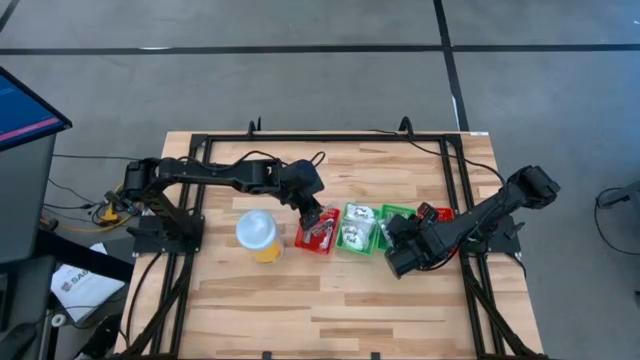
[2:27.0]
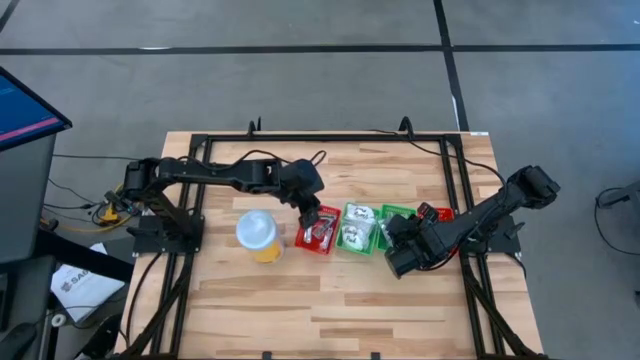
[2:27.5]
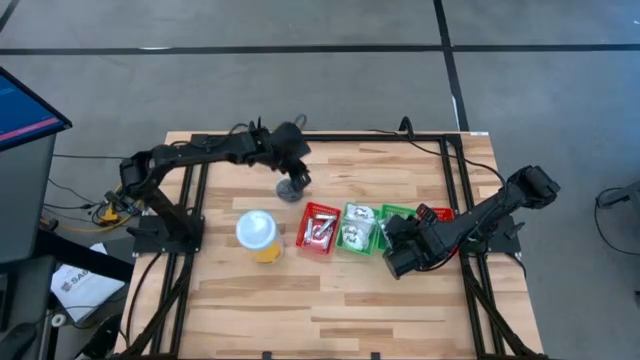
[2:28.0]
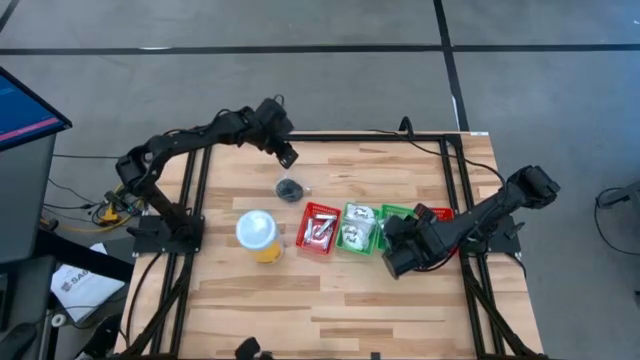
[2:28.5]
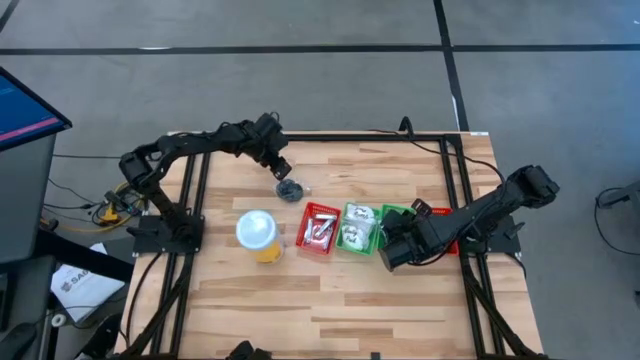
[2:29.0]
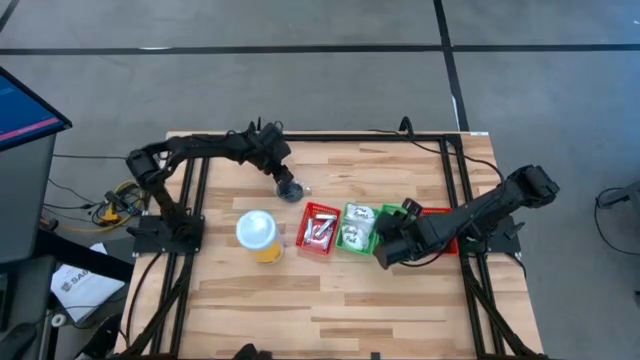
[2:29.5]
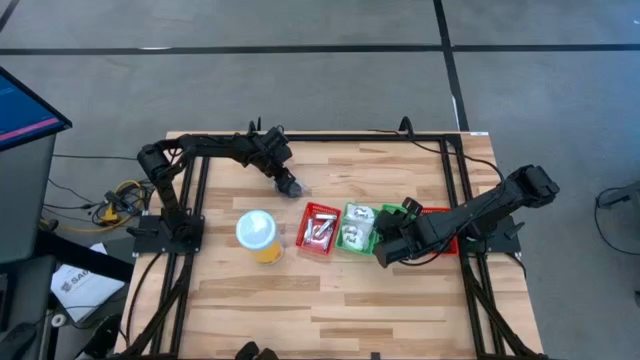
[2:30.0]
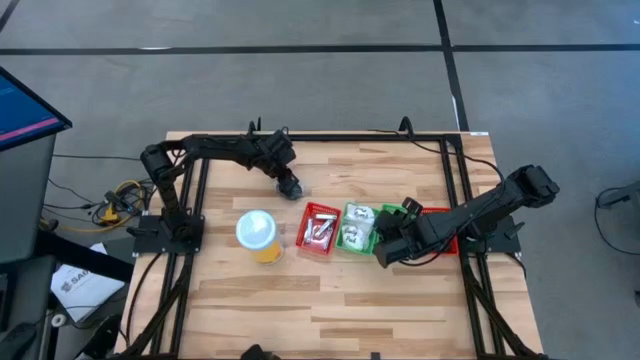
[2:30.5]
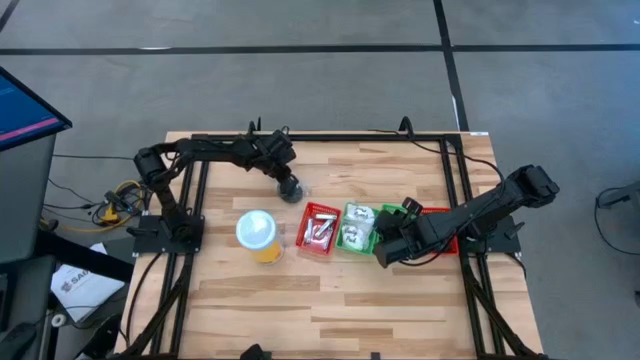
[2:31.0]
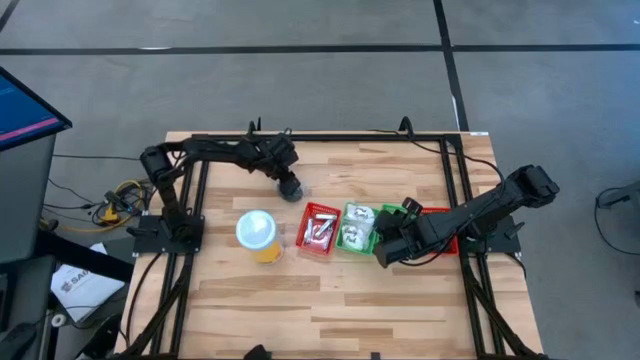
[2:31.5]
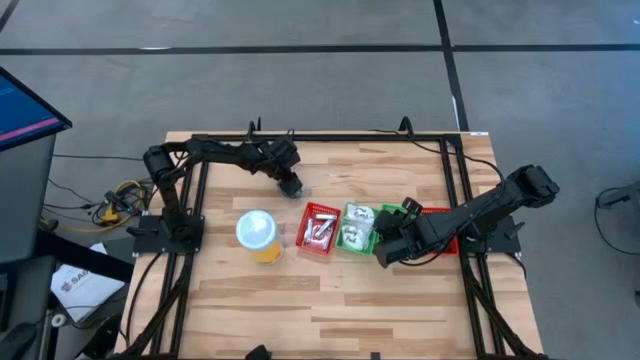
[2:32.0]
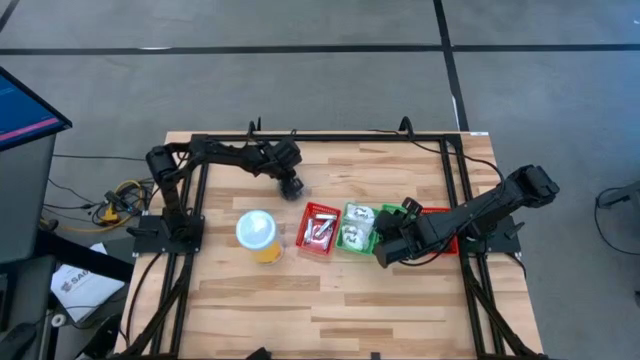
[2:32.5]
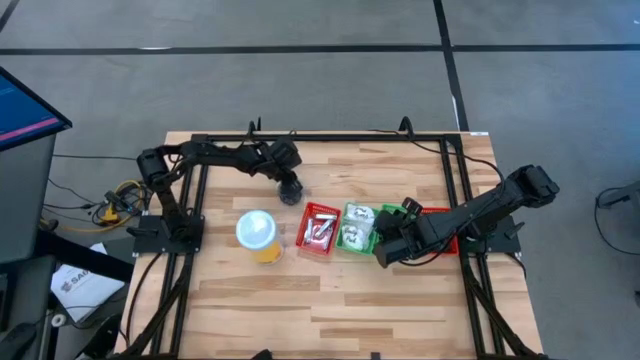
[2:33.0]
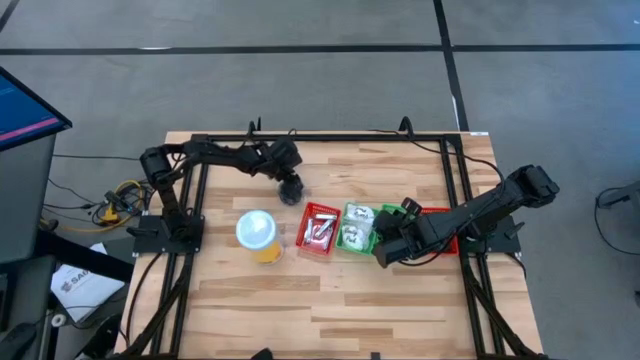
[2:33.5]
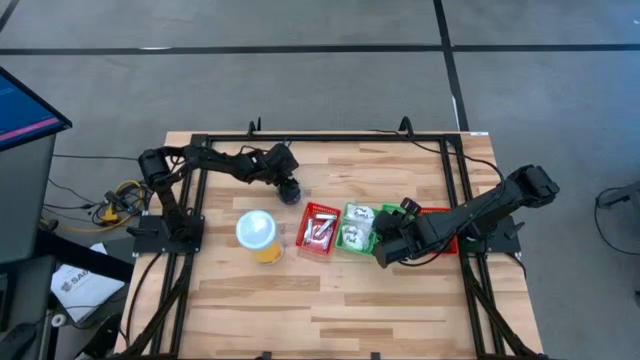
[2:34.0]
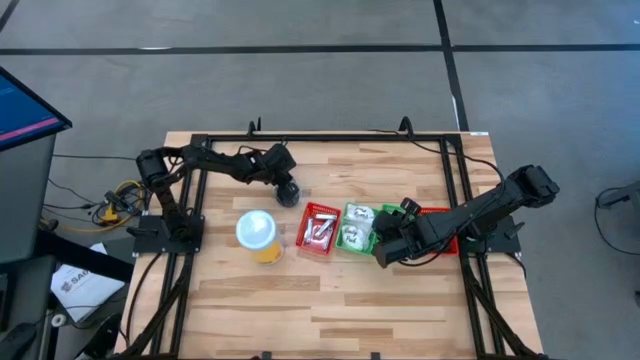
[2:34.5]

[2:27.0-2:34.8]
Task: Pick & Place Travel size toiletries
Put the black hairbrush into the right green bin

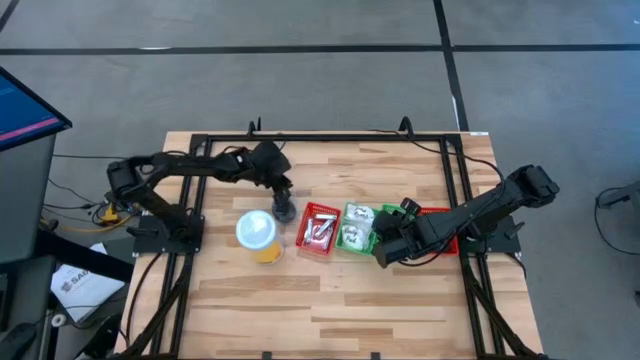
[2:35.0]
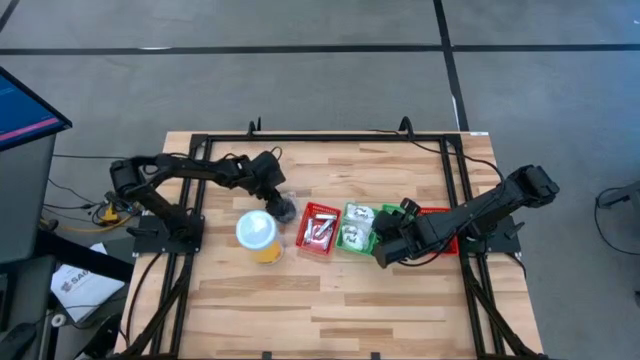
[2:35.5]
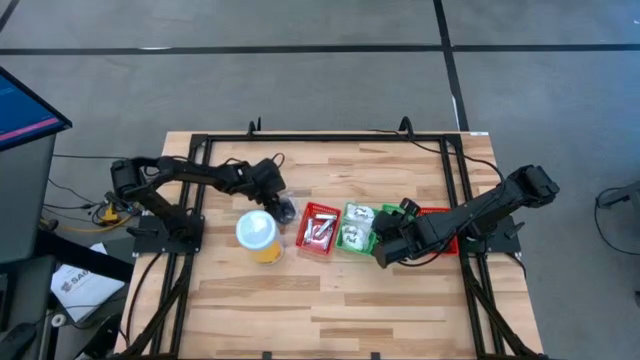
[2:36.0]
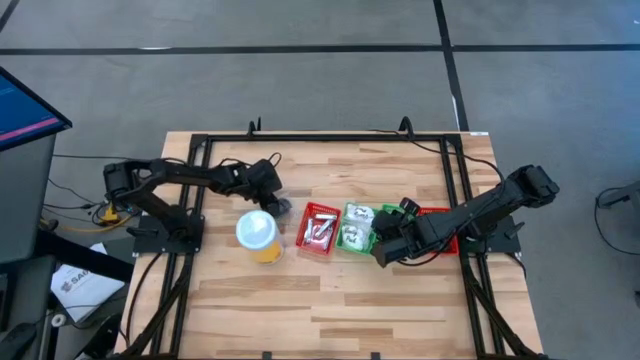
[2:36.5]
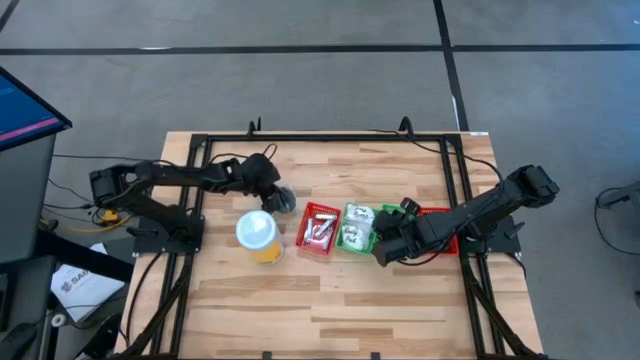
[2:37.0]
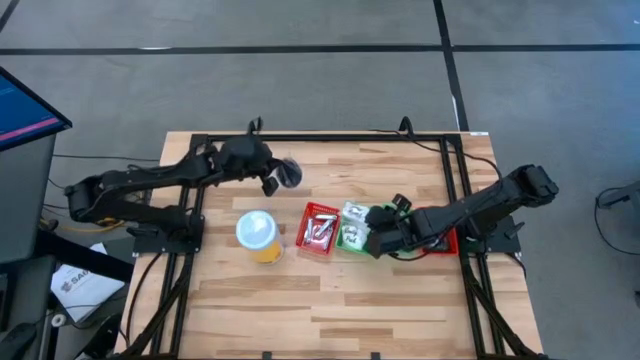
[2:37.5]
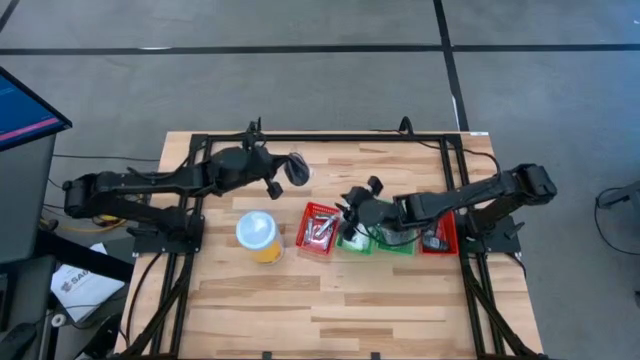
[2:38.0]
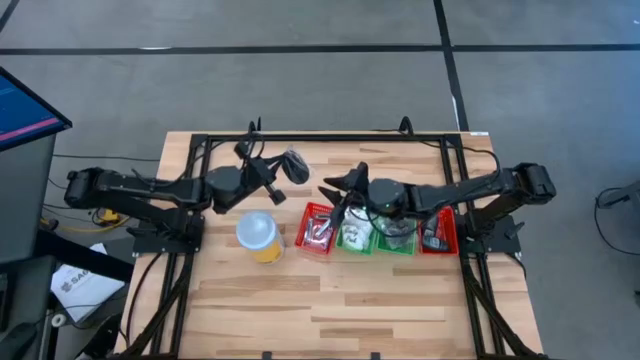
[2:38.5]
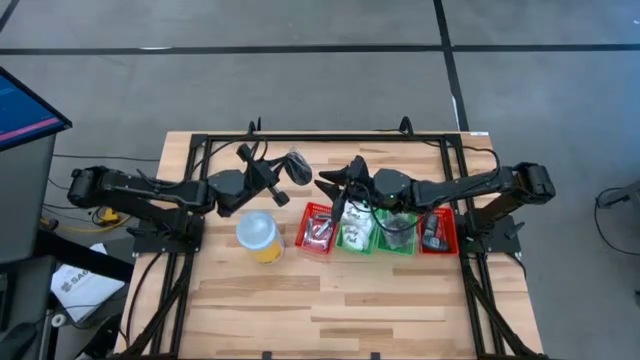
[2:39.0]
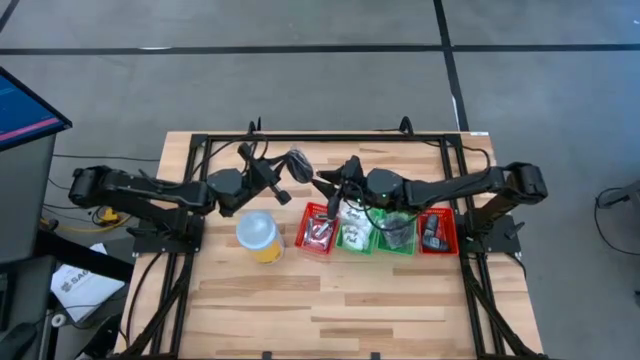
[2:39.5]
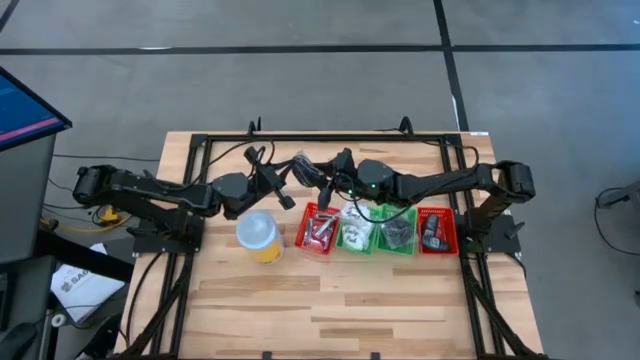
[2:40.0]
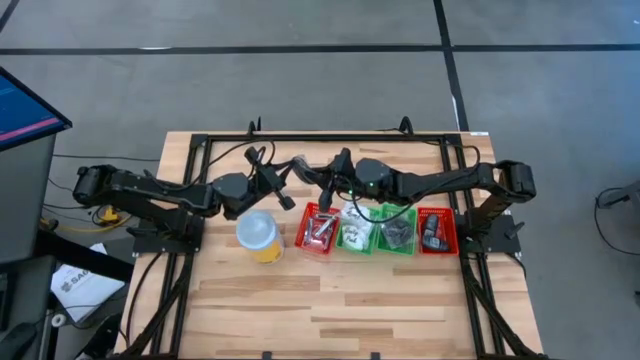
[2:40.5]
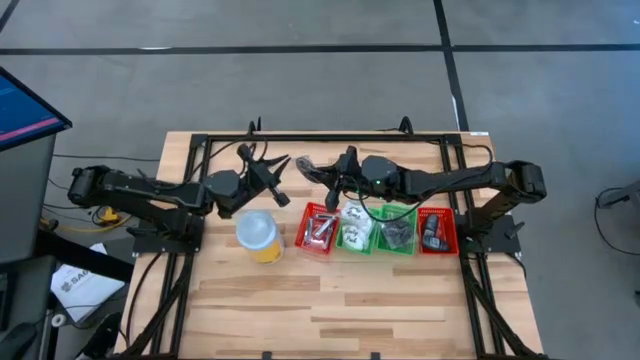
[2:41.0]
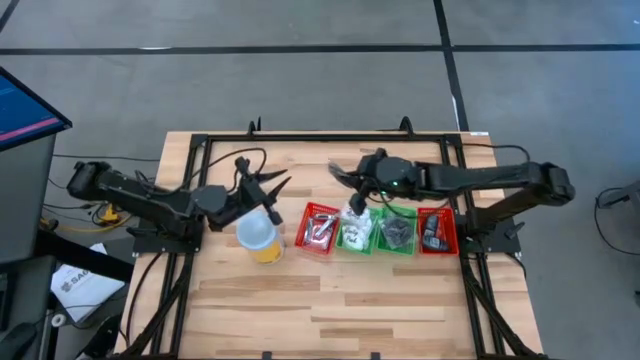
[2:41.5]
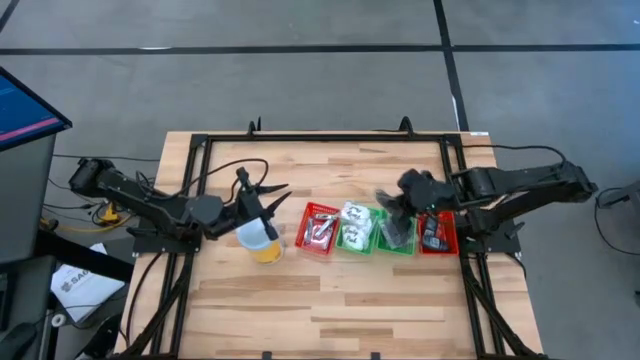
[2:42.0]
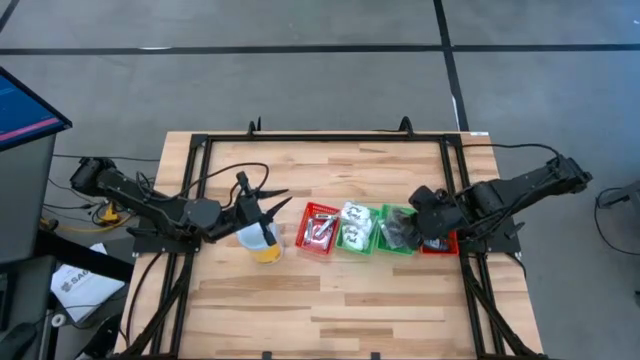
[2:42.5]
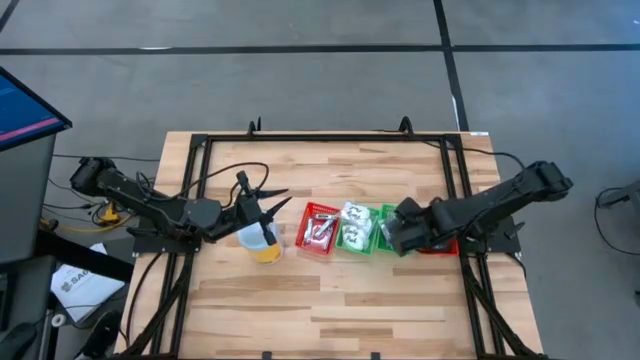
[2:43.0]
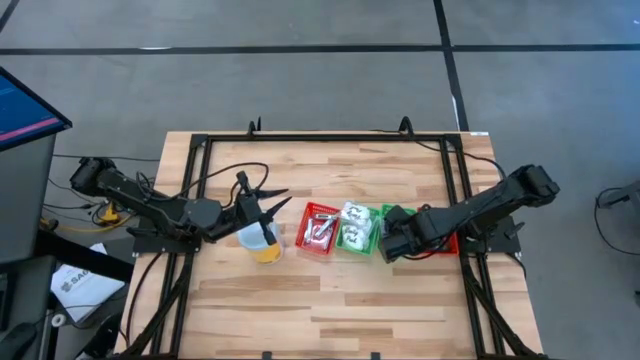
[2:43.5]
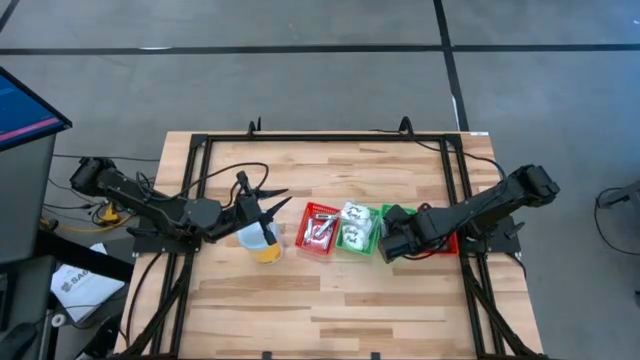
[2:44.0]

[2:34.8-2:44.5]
Put the black hairbrush into the right green bin

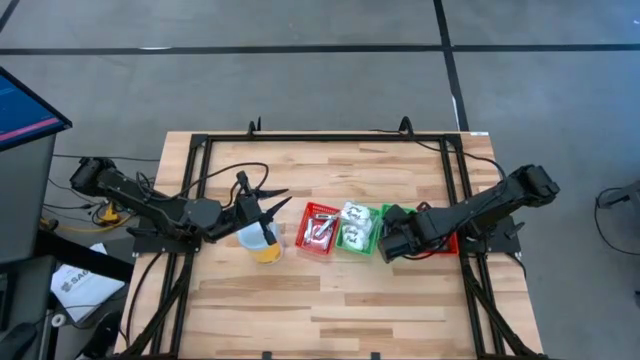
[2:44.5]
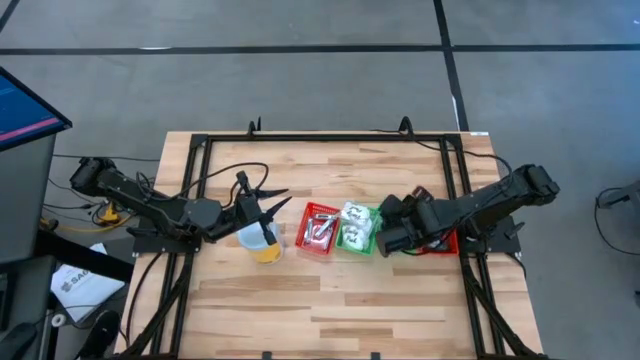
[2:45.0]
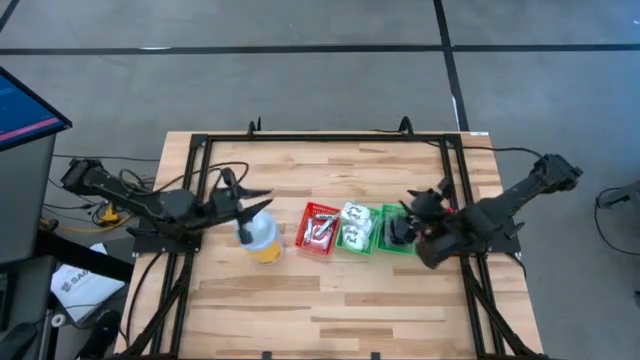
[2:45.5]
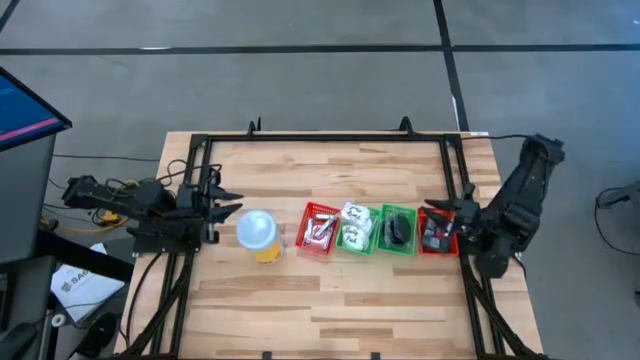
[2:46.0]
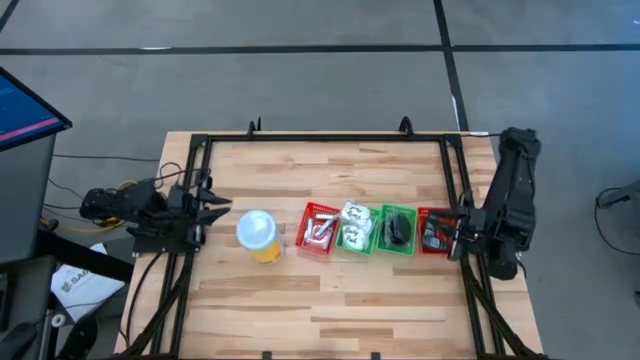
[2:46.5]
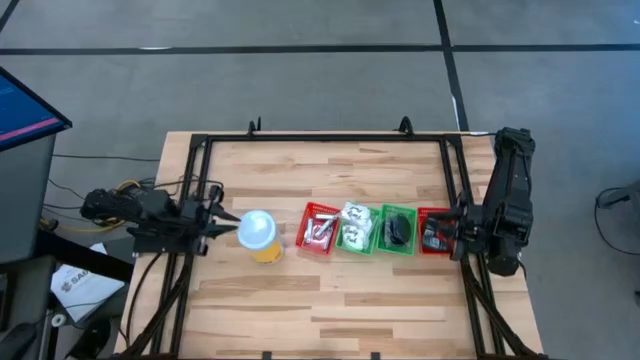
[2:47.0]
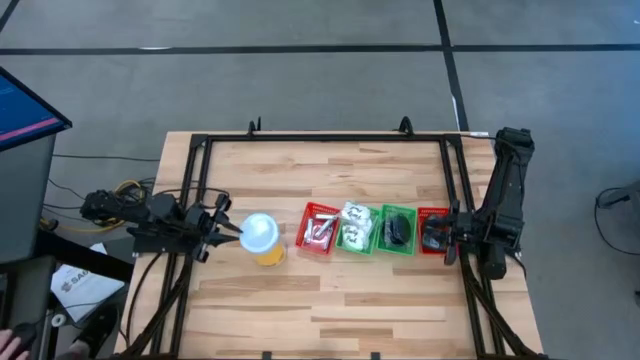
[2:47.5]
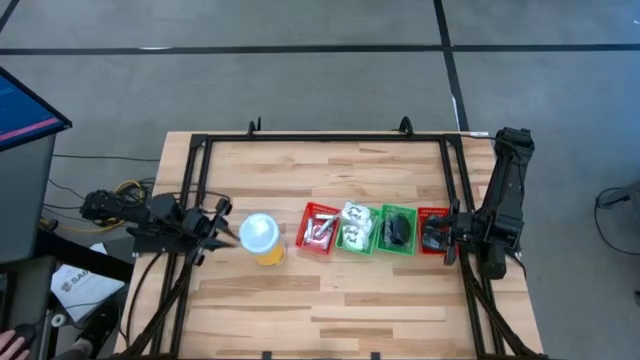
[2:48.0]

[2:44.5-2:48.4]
Return to Home Position
